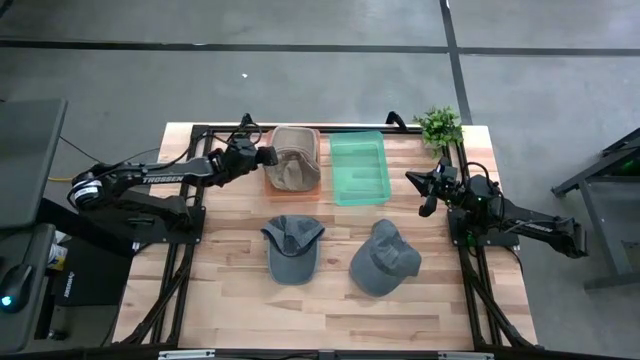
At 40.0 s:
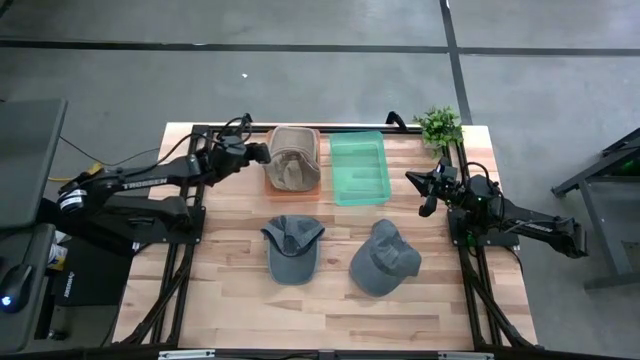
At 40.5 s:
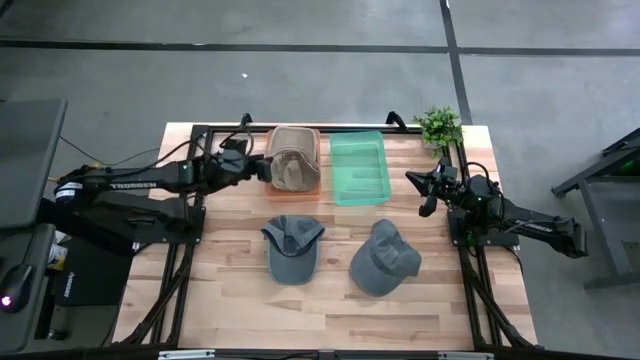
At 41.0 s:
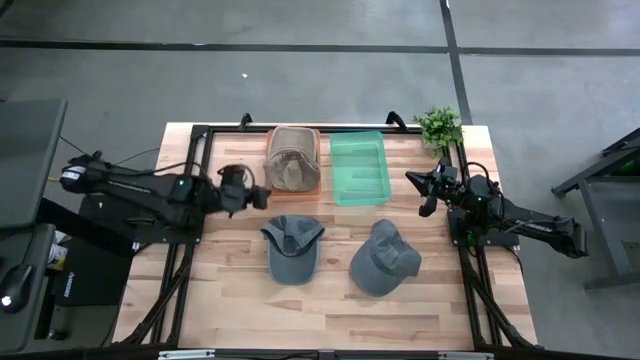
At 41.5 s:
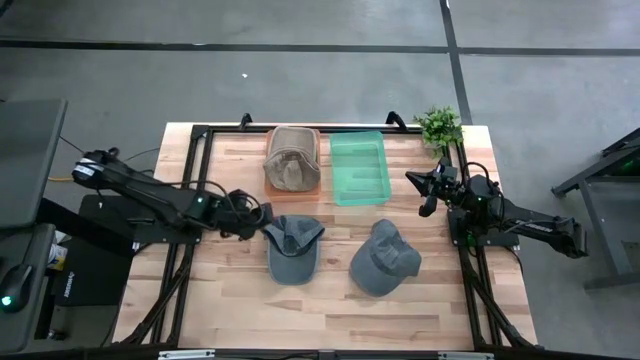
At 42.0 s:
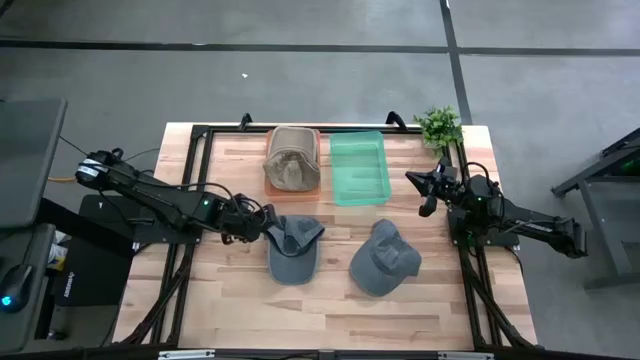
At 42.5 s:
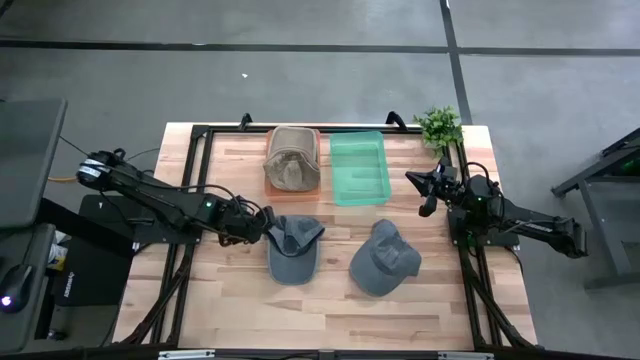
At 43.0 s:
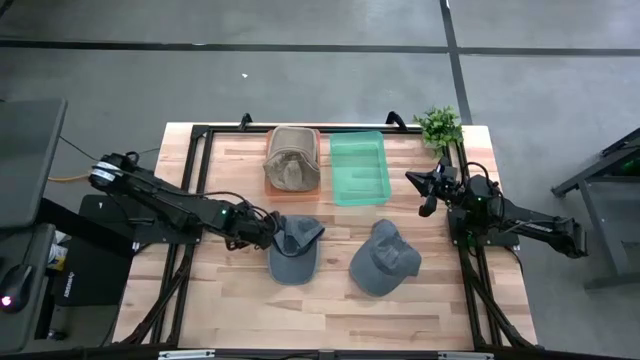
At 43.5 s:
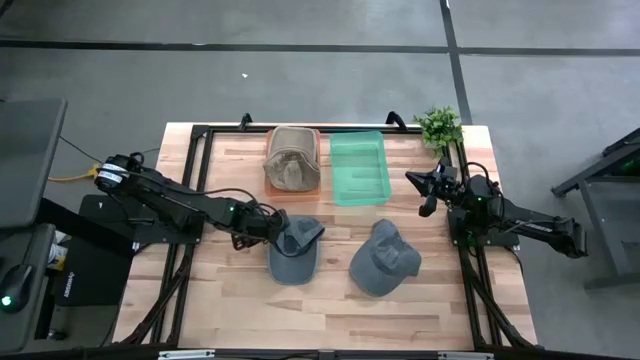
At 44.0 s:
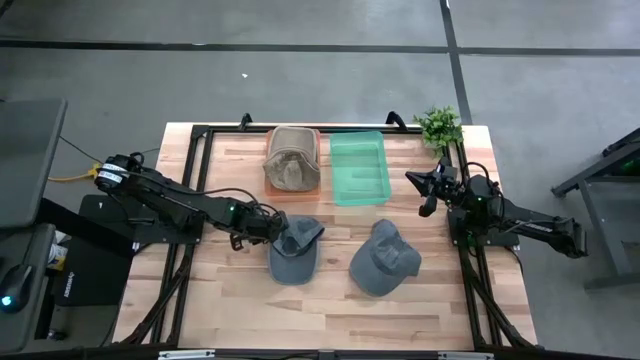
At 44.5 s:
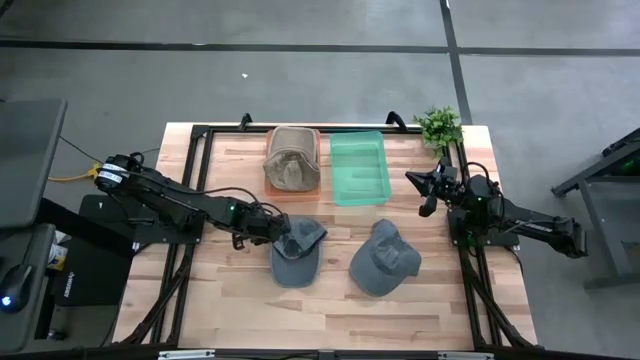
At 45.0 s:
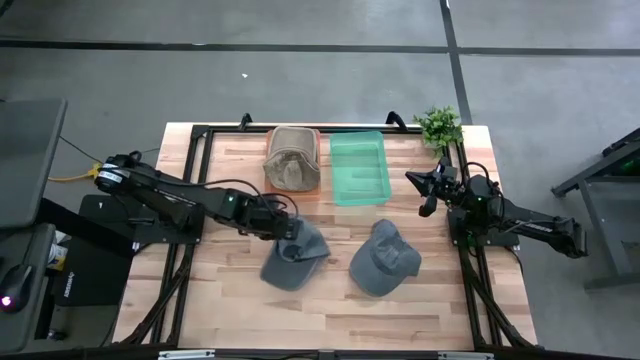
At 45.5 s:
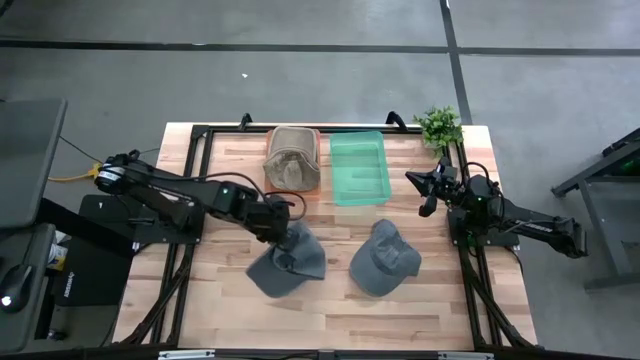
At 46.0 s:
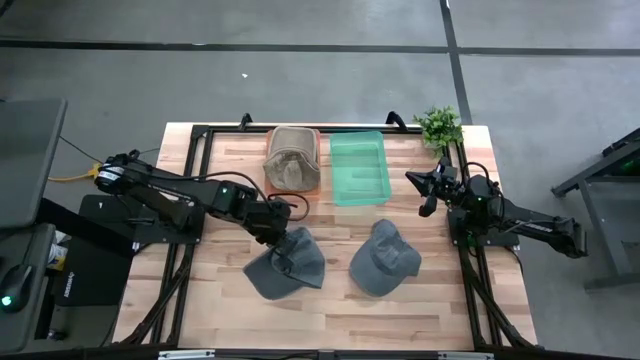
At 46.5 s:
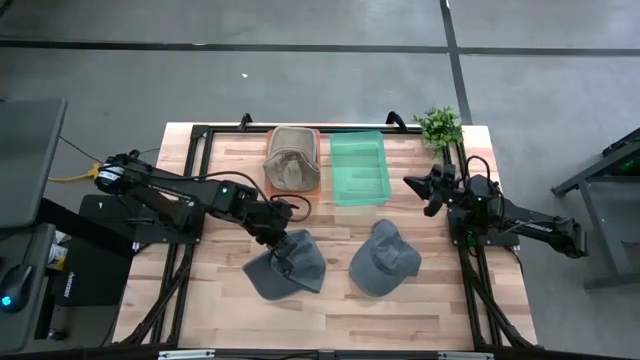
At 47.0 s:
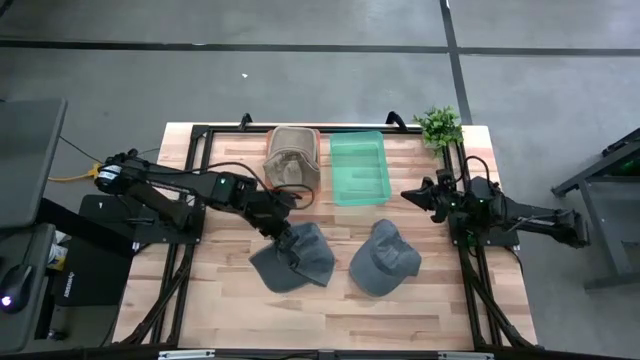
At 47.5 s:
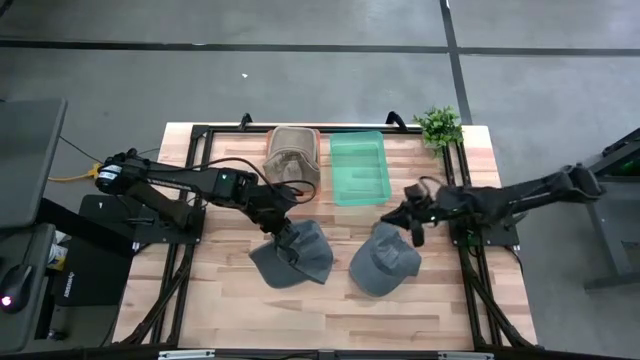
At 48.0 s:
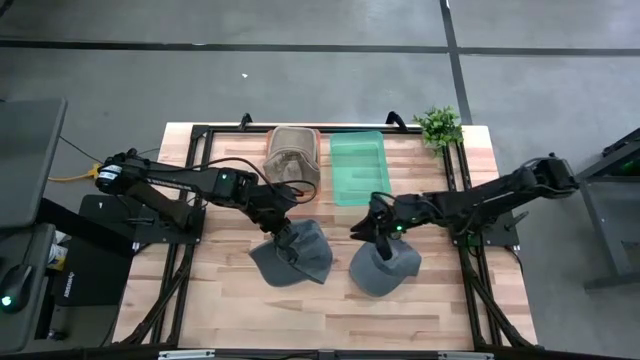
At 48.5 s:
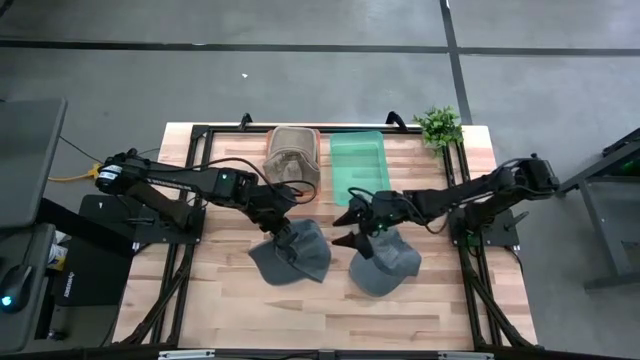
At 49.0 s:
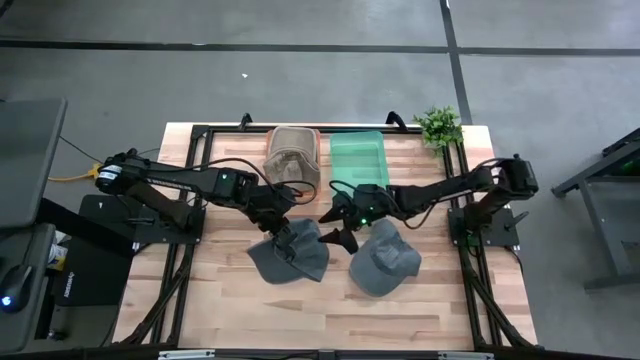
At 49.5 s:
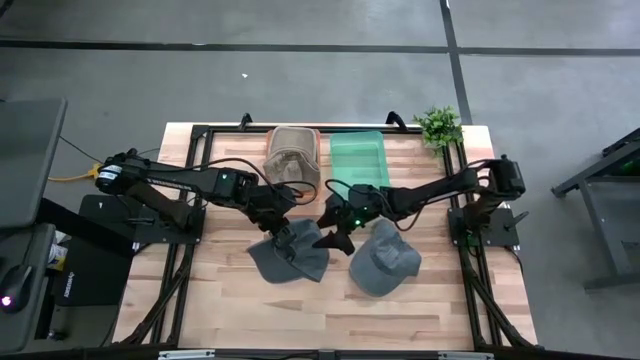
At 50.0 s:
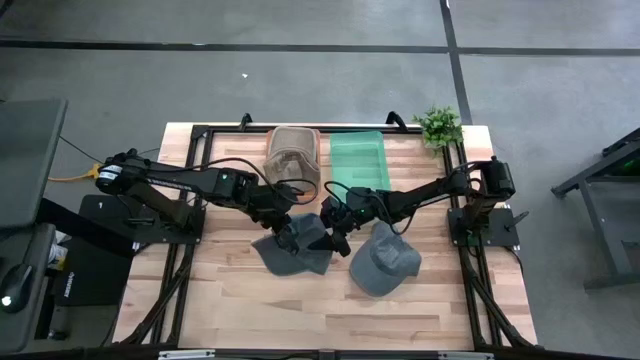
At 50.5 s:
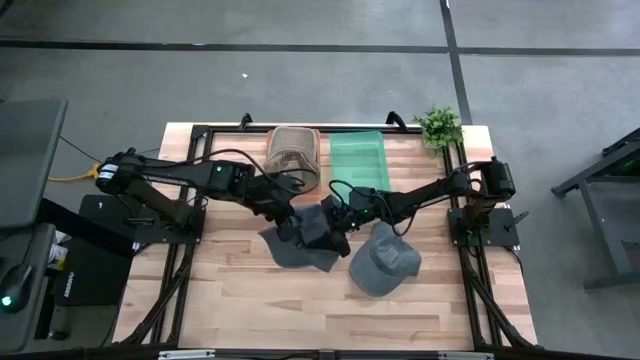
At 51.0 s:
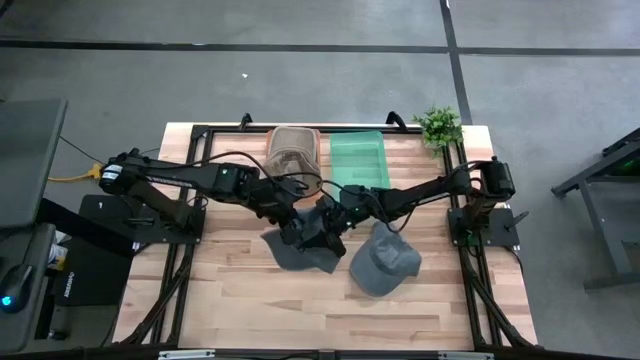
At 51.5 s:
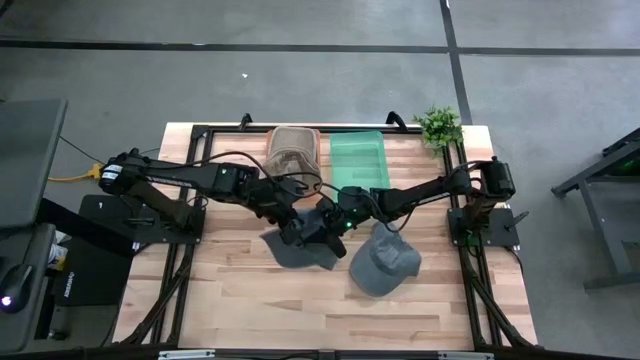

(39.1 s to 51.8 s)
Task: Pick & Place hat
Put the left black cap into the blue bin
